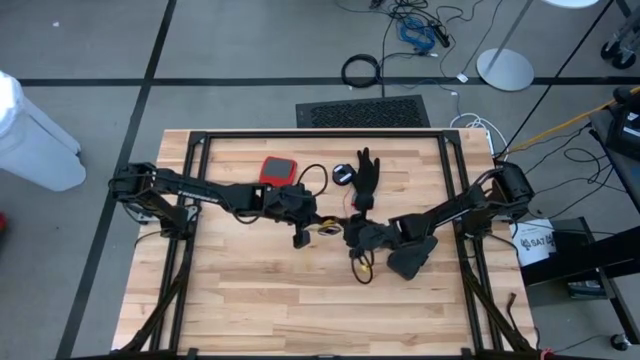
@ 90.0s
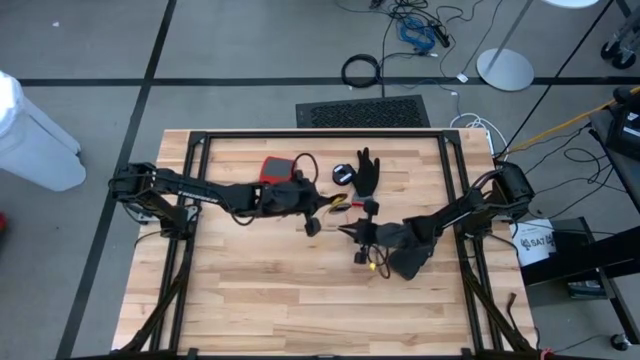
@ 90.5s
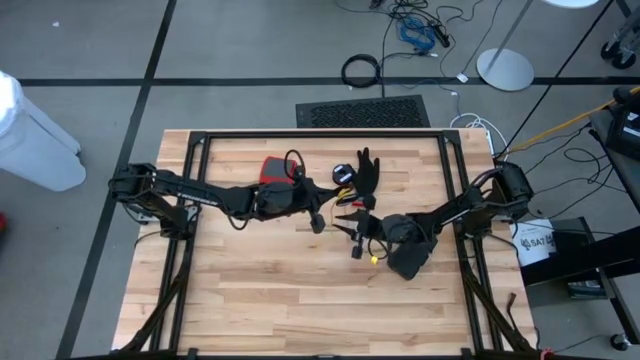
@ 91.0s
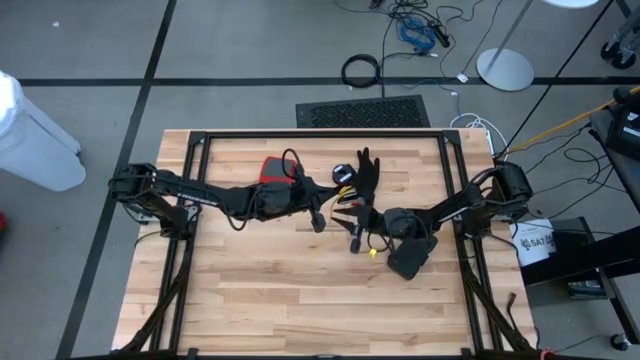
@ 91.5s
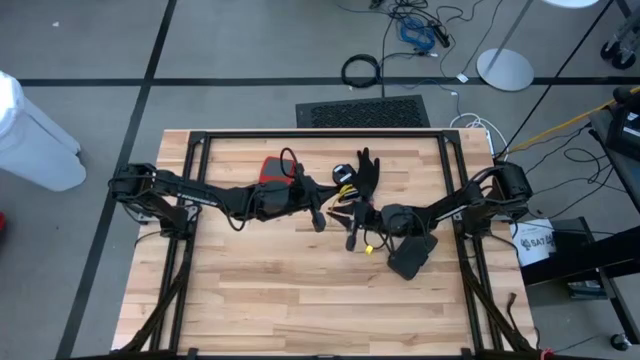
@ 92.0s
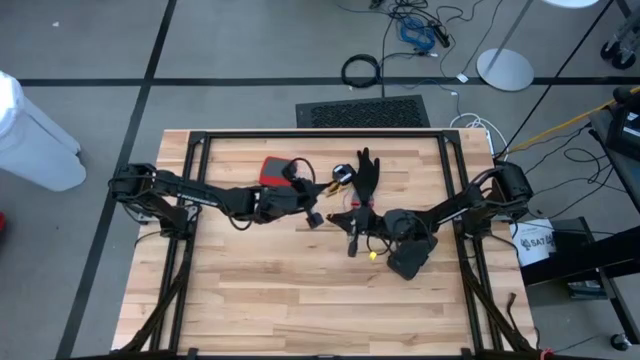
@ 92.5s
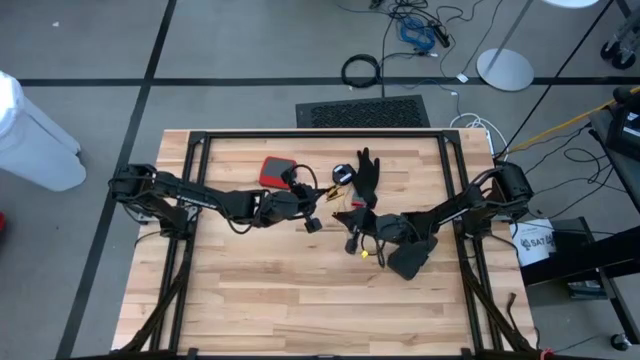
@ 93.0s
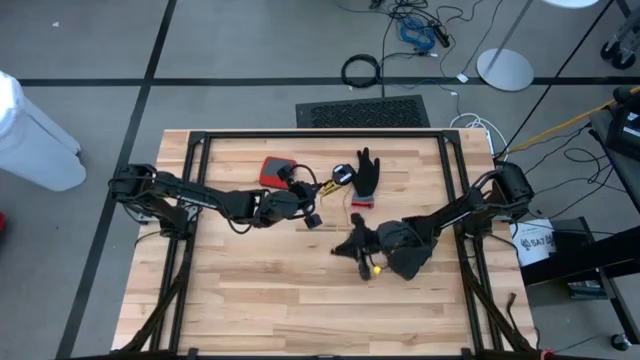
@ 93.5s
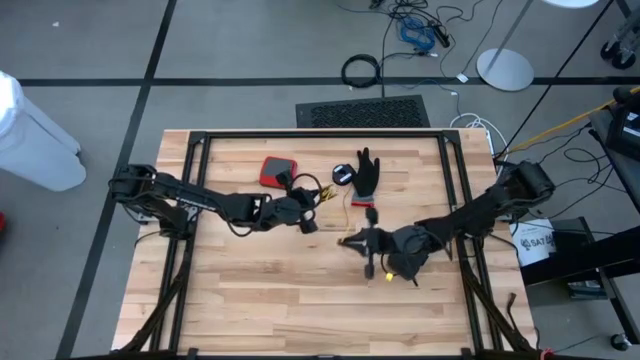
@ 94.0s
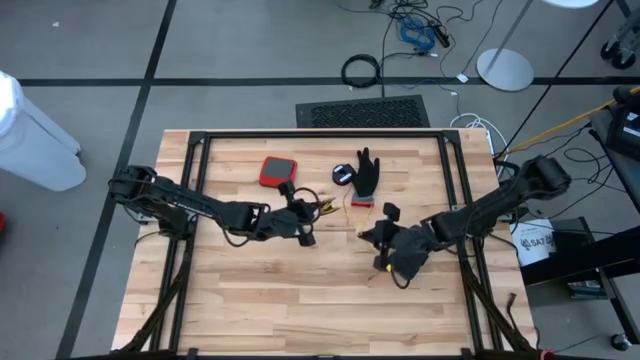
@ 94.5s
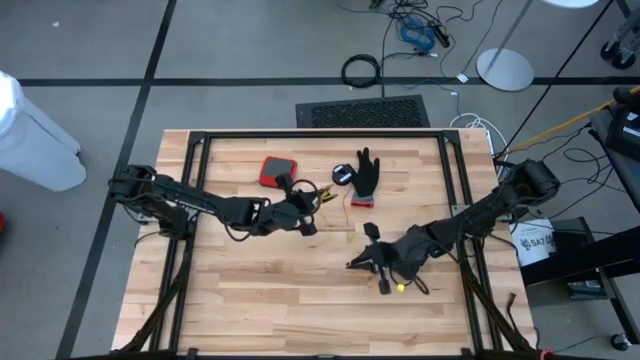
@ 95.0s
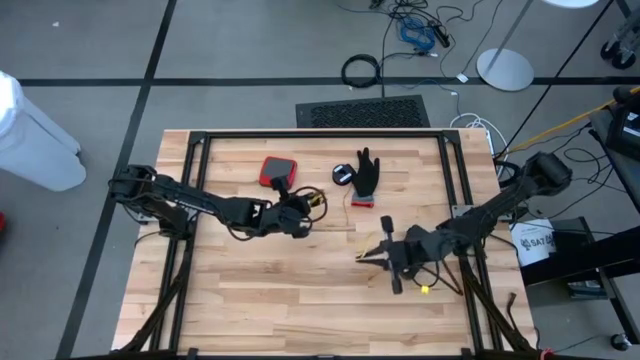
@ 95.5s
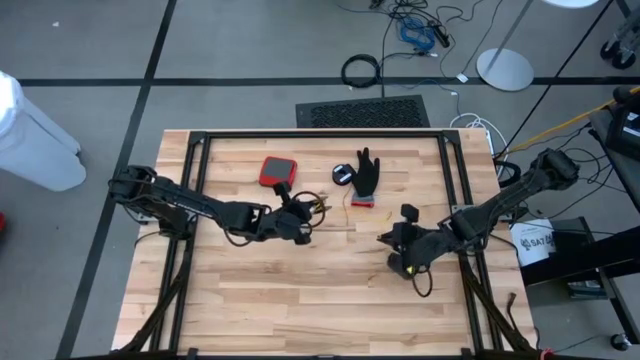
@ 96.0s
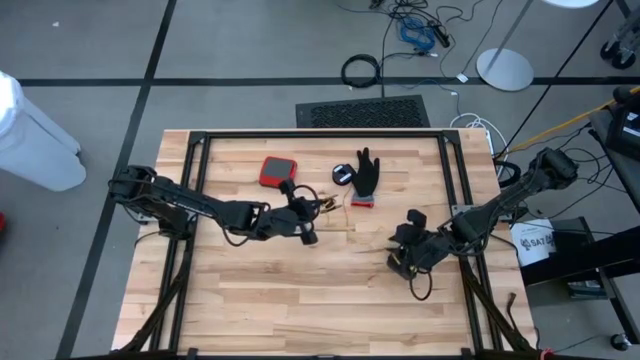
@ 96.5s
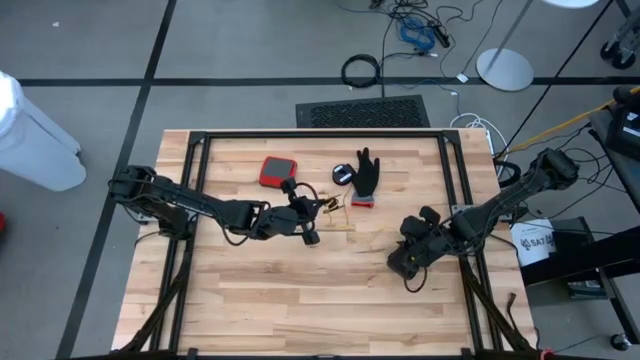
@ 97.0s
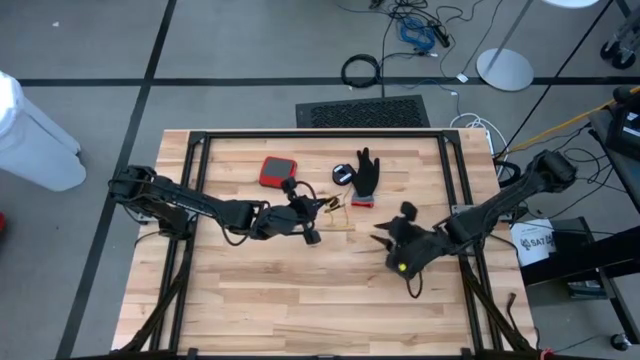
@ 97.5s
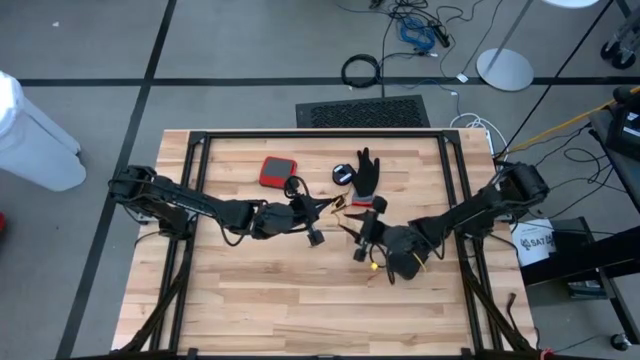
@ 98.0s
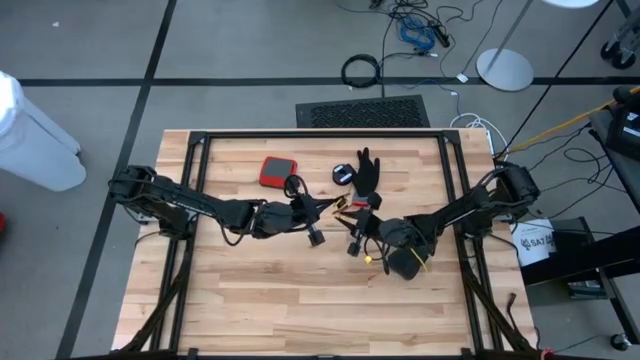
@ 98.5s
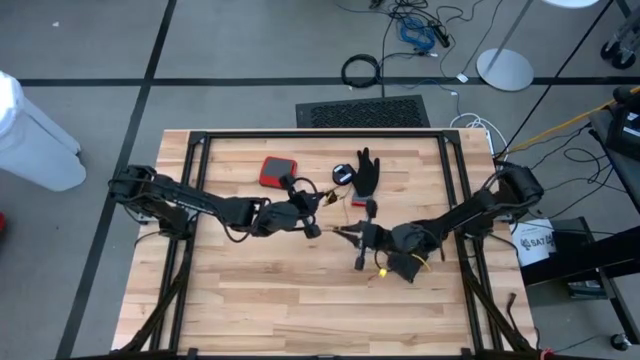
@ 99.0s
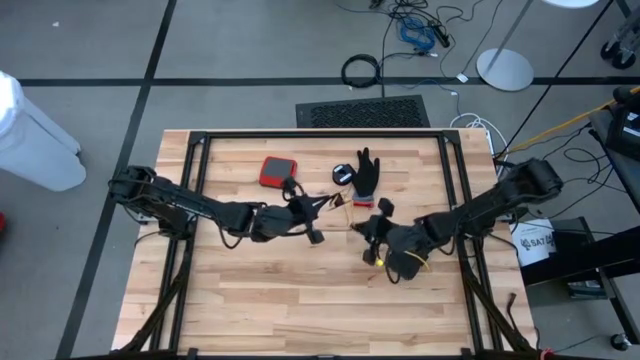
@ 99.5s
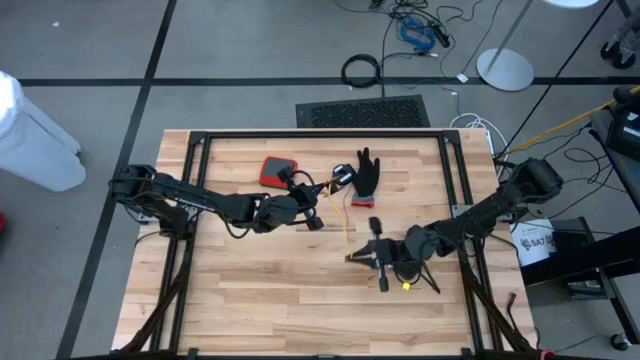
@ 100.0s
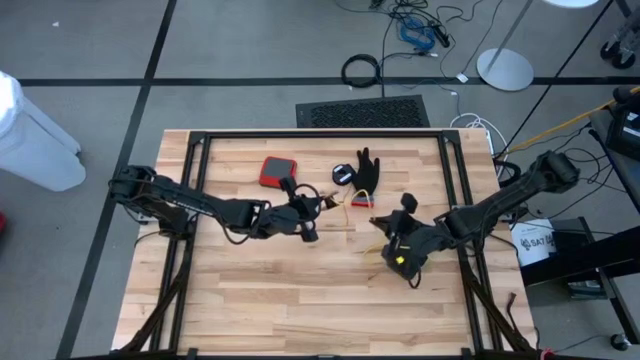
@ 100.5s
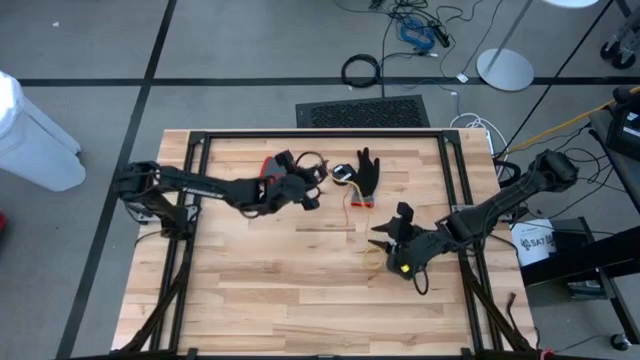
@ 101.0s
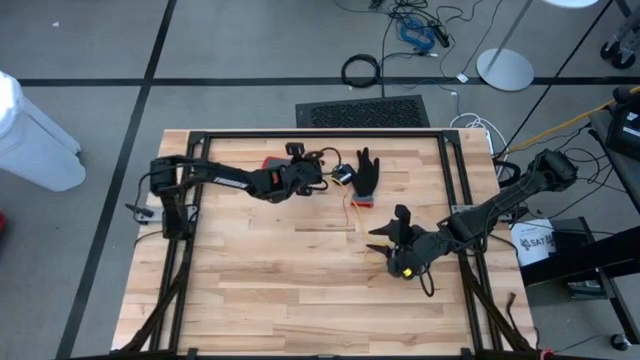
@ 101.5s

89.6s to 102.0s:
Task: Coil cords
Uncoil the yellow wire from the spool

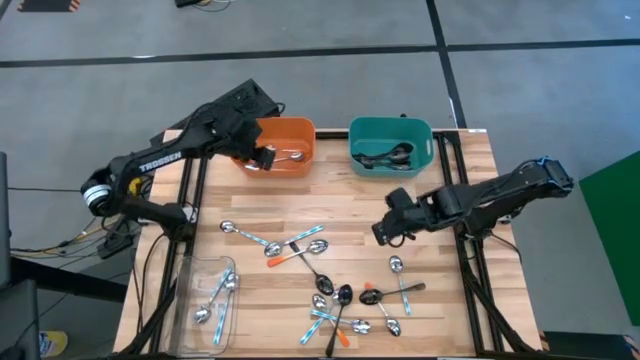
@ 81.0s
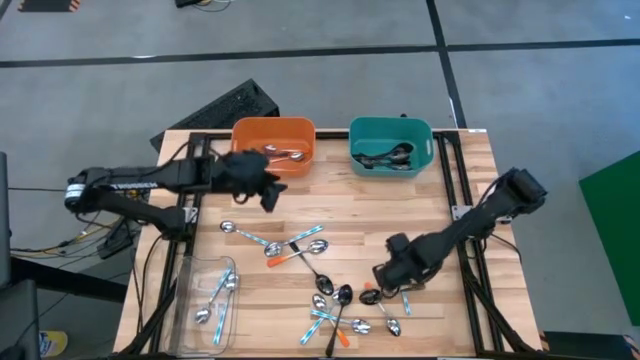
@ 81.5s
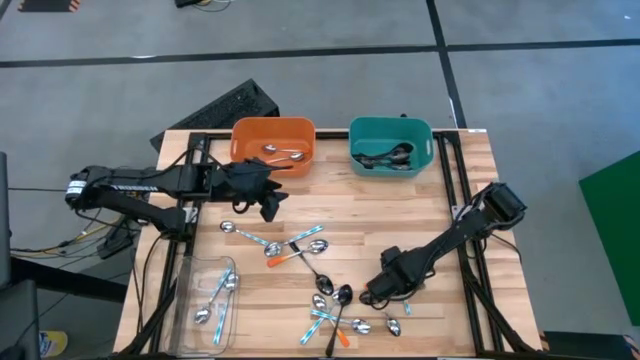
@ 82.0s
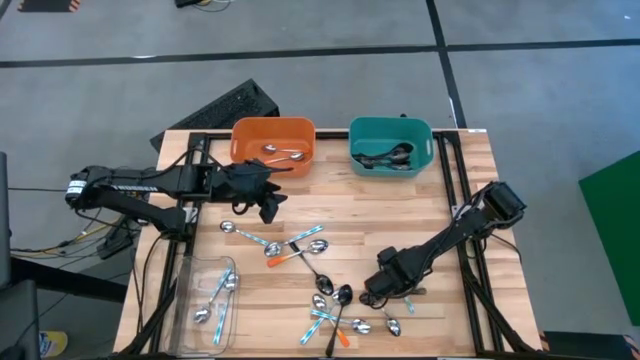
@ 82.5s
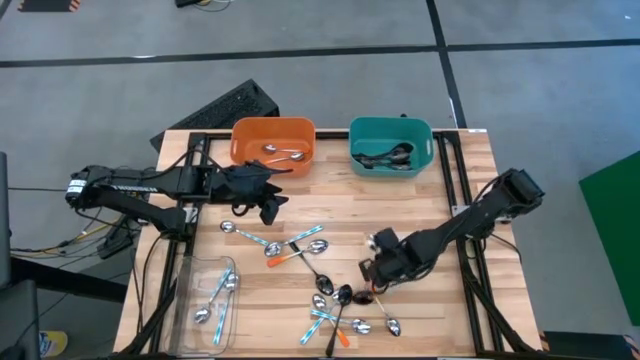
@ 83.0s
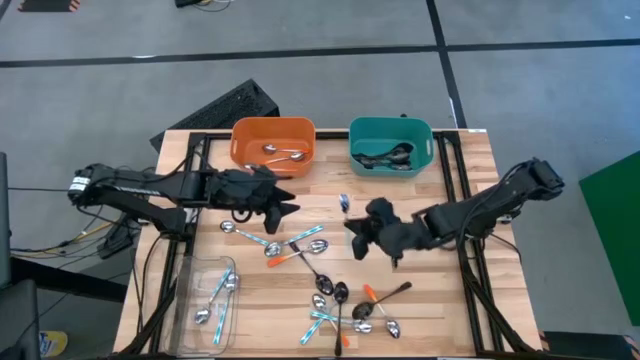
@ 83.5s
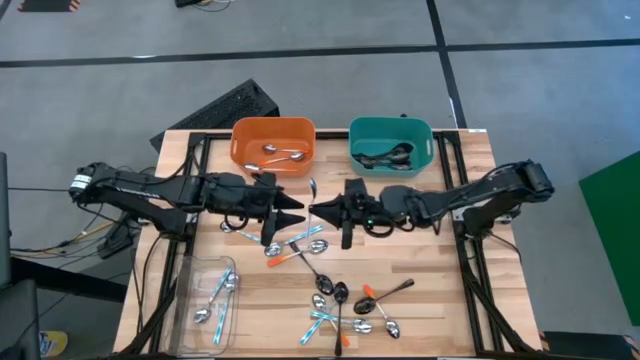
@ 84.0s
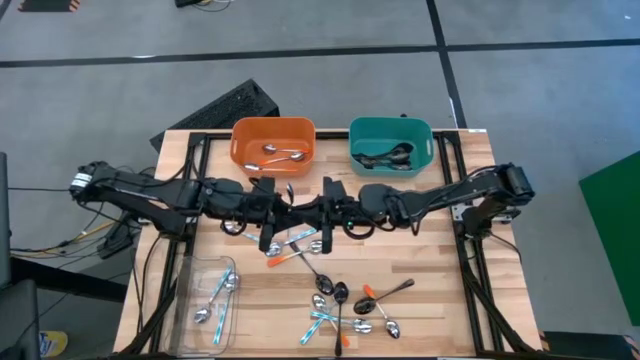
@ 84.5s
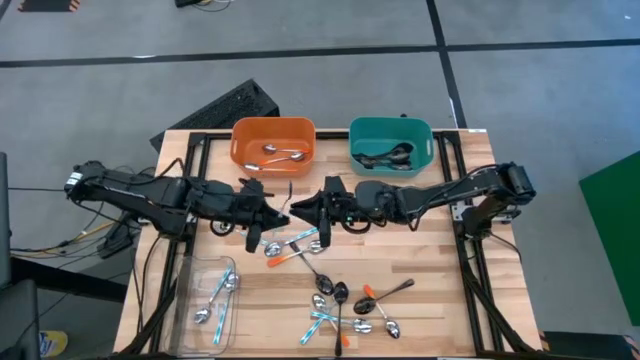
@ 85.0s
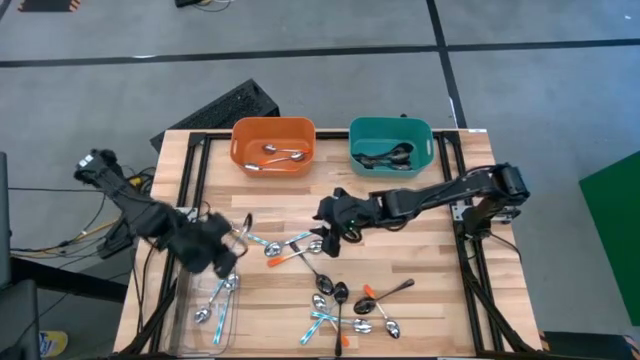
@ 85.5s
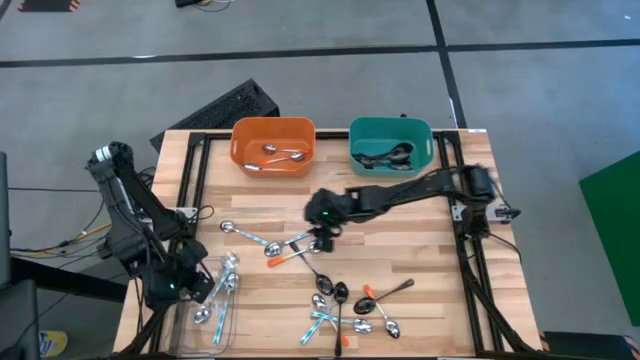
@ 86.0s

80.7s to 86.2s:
Task: Sort silverware by color (type)
Put the green spoon into the transparent bin

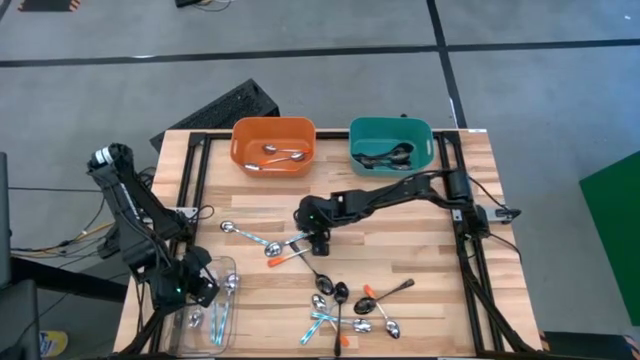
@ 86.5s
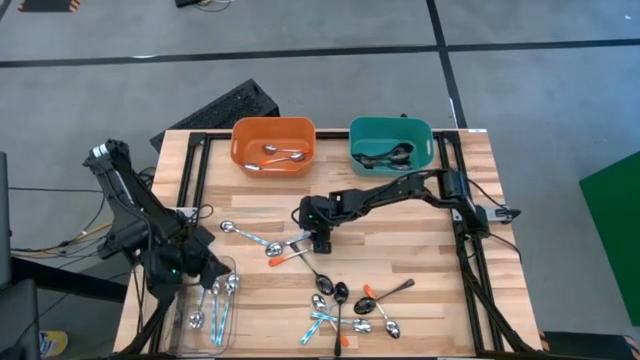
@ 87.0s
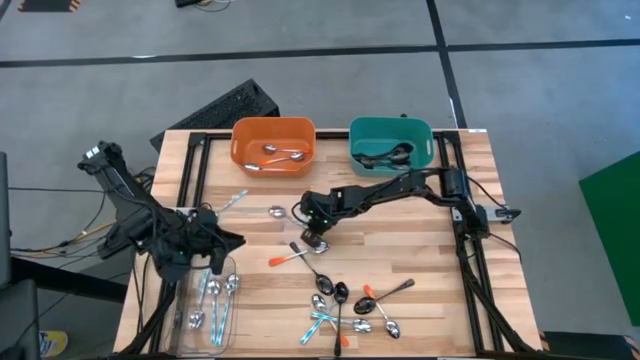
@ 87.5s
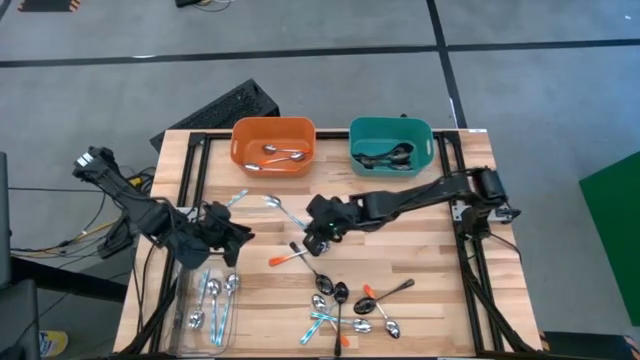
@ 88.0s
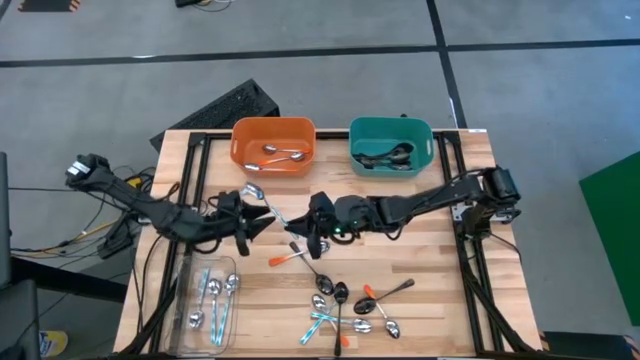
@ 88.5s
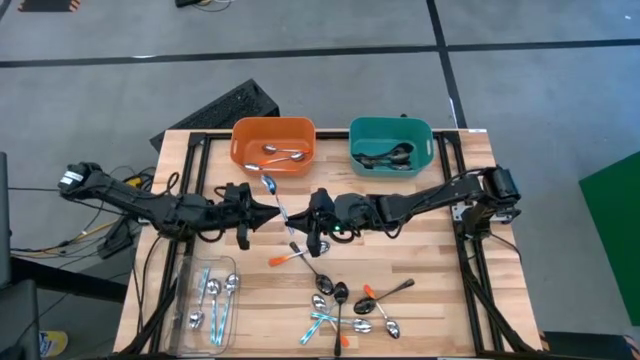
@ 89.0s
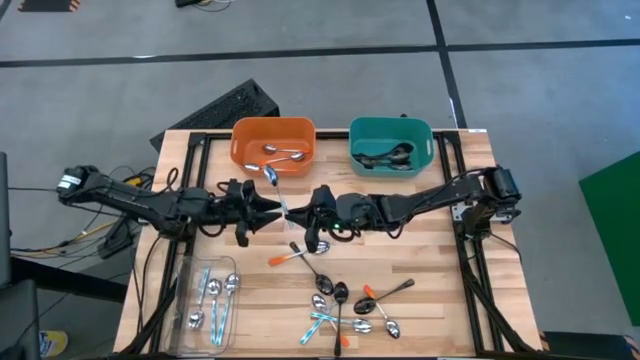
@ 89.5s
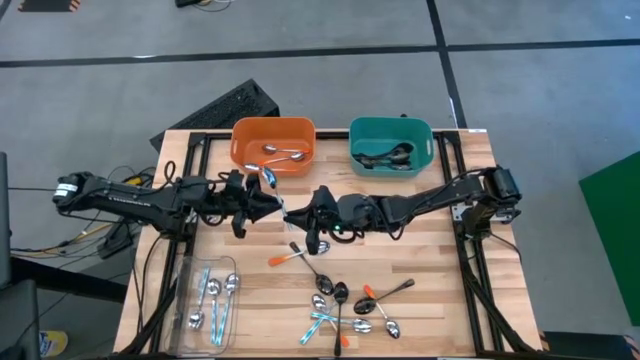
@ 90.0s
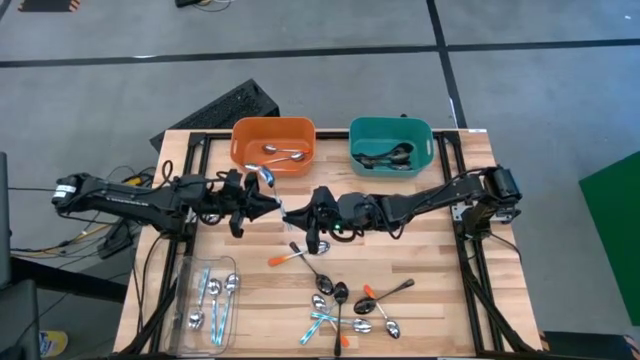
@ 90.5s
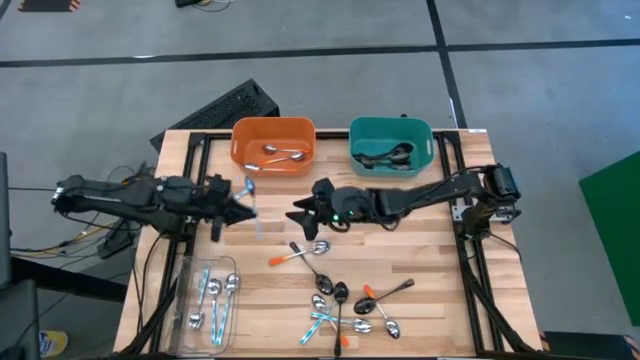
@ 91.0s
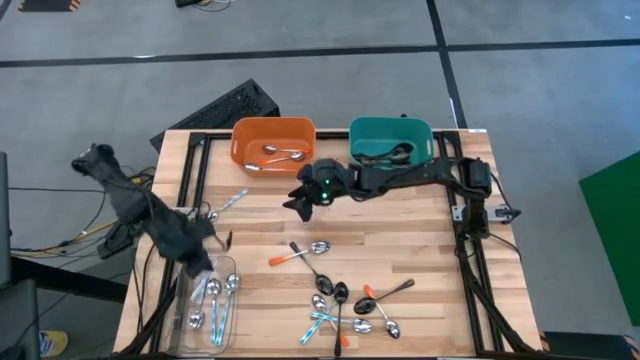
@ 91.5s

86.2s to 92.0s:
Put the green spoon into the transparent bin
